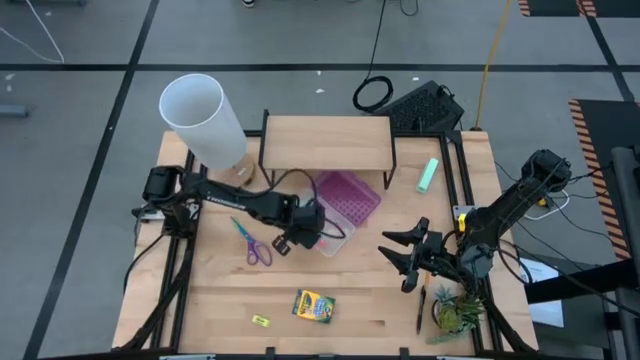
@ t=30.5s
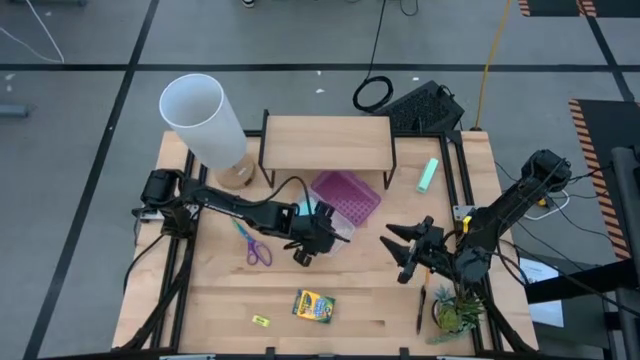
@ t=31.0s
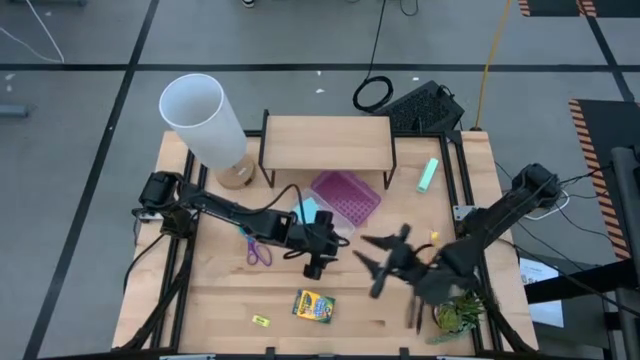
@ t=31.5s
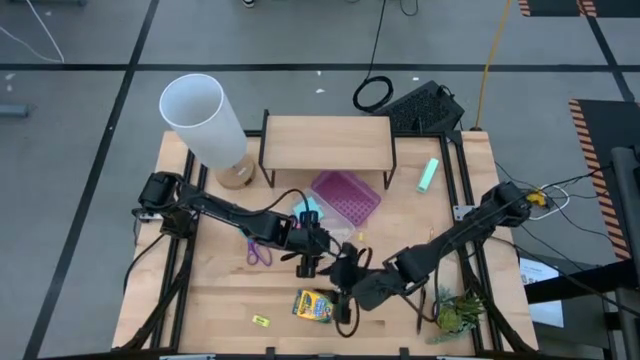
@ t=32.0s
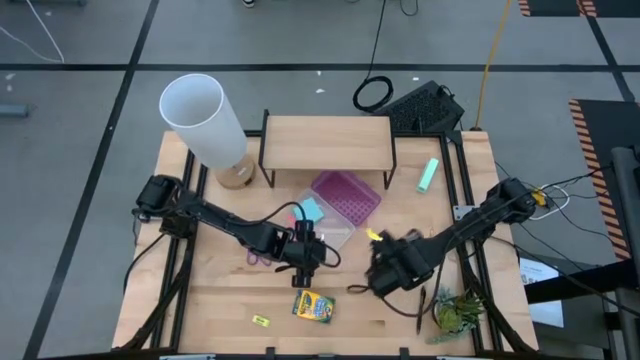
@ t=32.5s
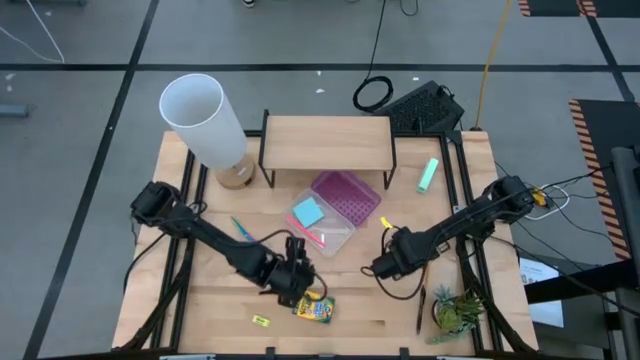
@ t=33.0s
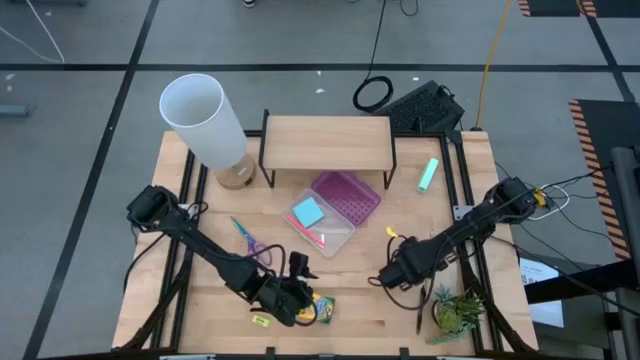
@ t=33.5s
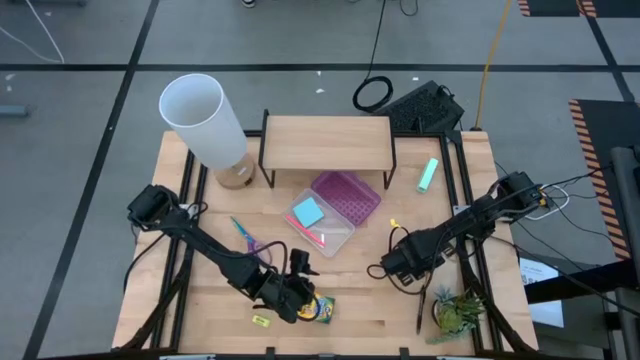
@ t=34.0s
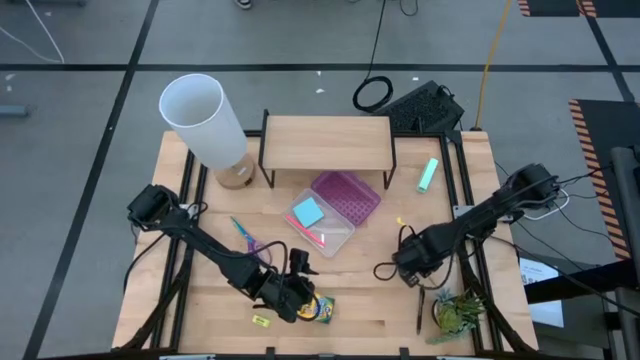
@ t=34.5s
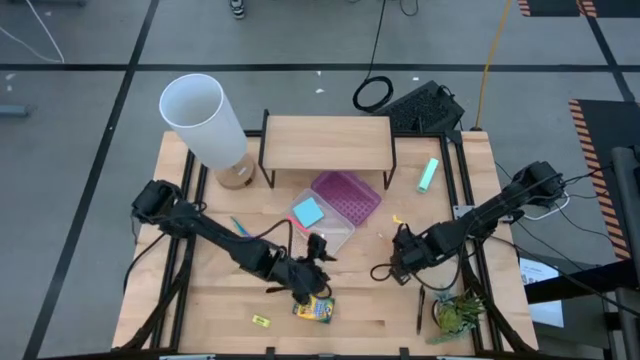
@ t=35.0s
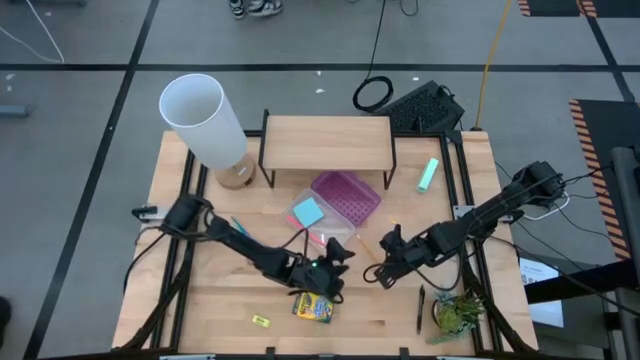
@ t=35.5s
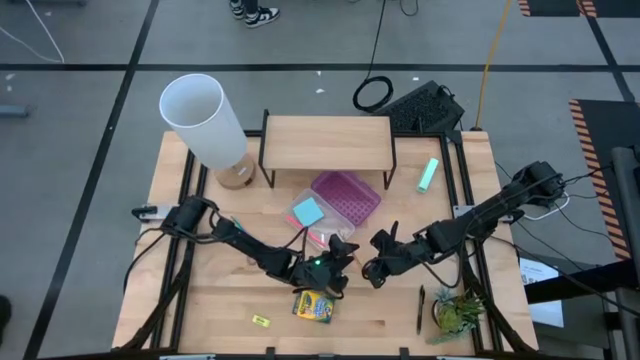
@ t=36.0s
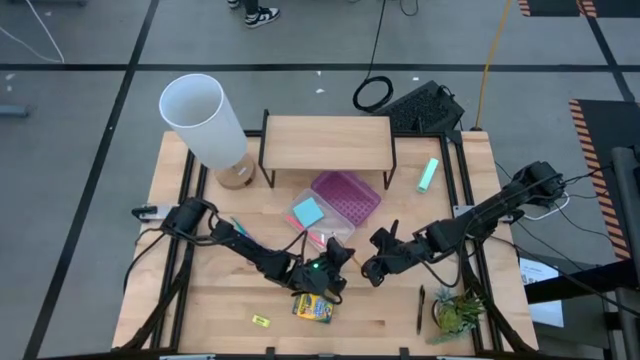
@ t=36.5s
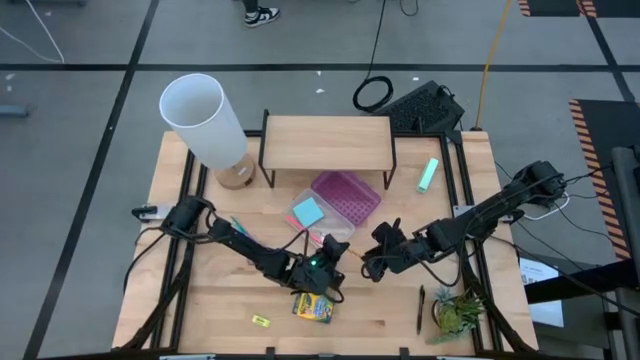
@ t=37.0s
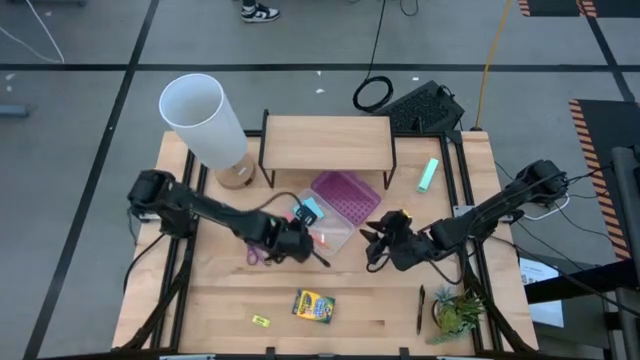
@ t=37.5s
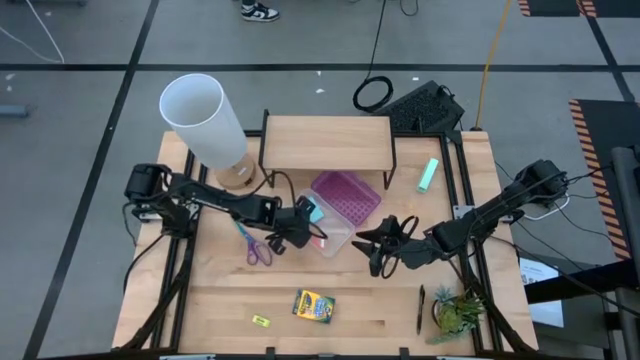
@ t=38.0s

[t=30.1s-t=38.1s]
Task: Pack school essentials
Put the orange pencil into the supply box

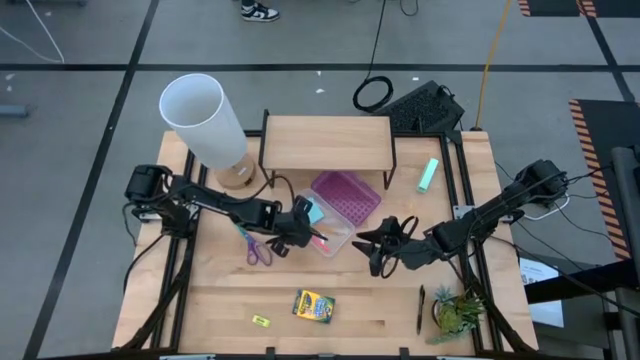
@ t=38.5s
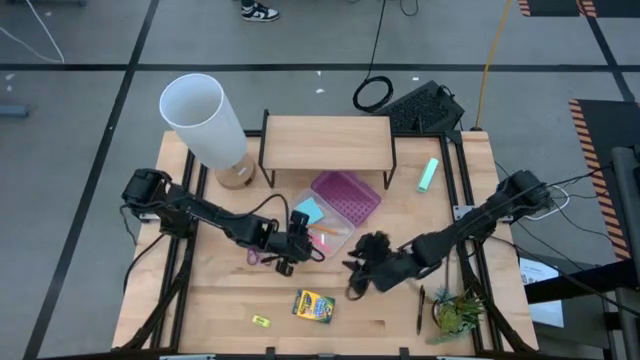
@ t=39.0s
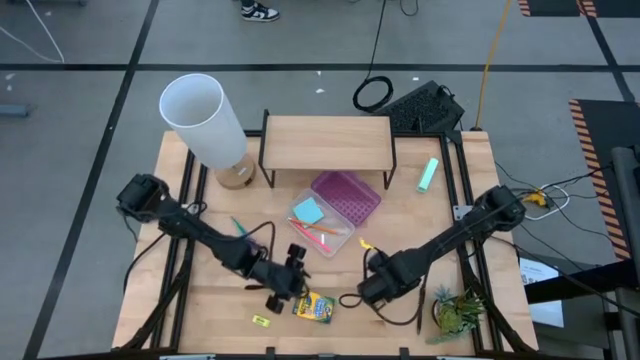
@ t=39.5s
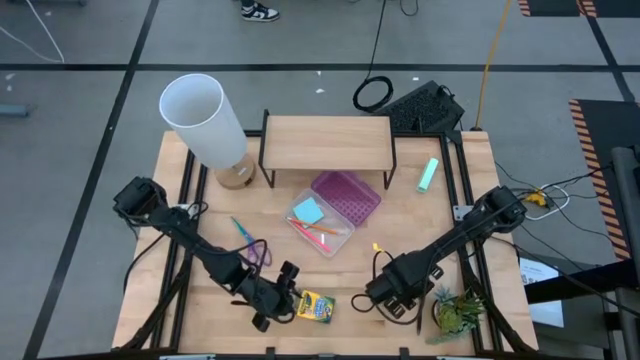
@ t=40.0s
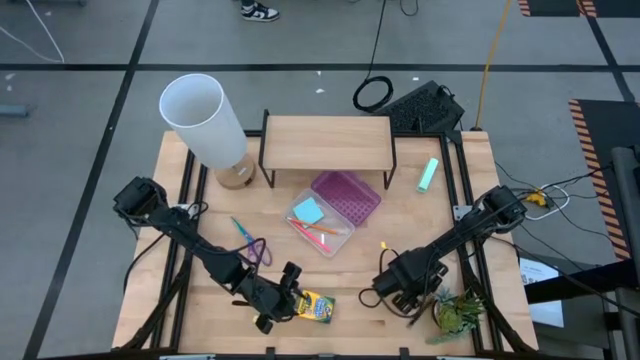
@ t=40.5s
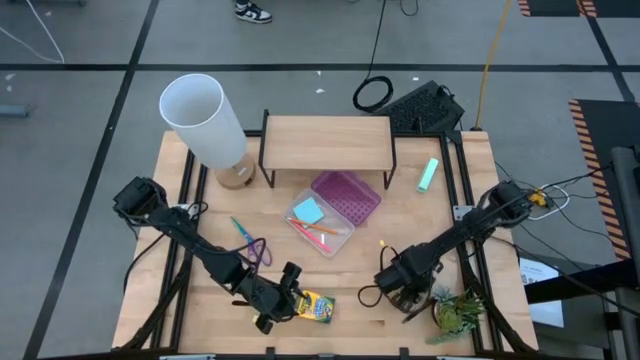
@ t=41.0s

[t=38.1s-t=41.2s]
Put the pen into the supply box

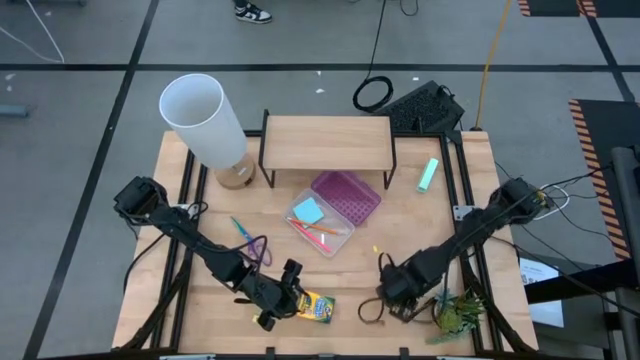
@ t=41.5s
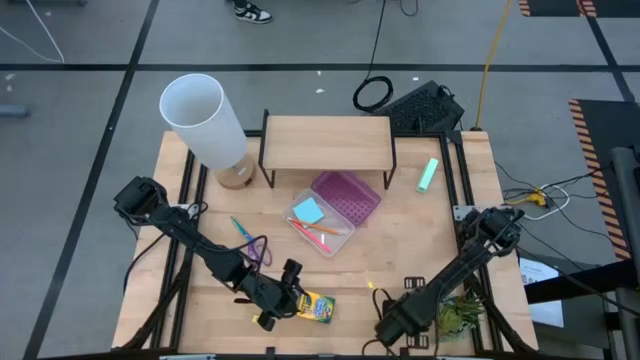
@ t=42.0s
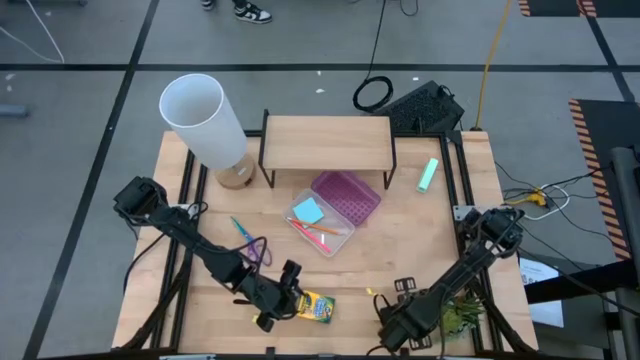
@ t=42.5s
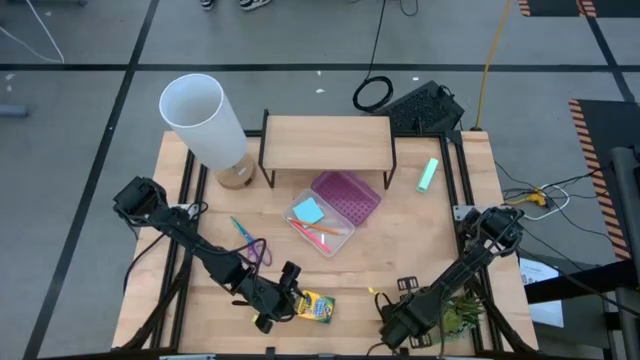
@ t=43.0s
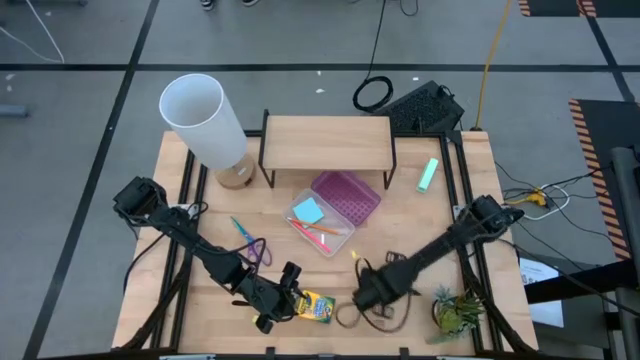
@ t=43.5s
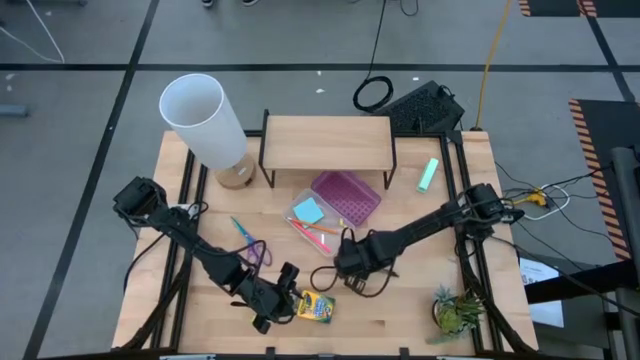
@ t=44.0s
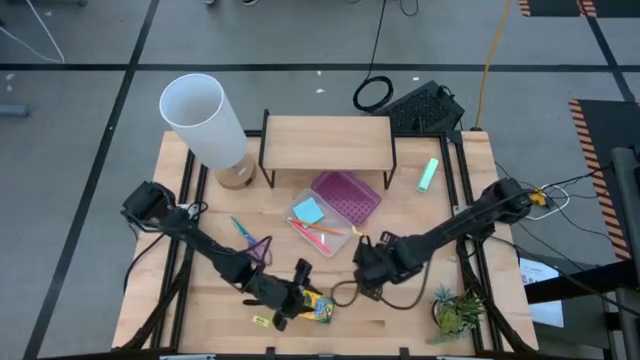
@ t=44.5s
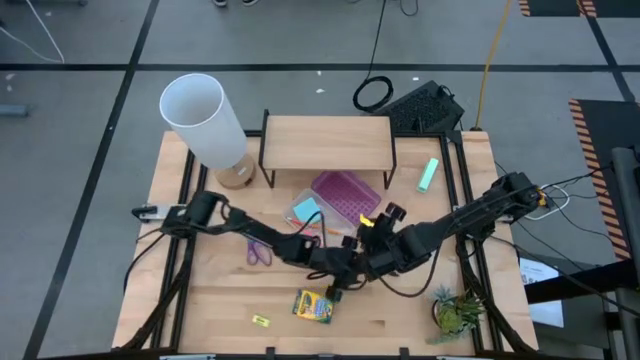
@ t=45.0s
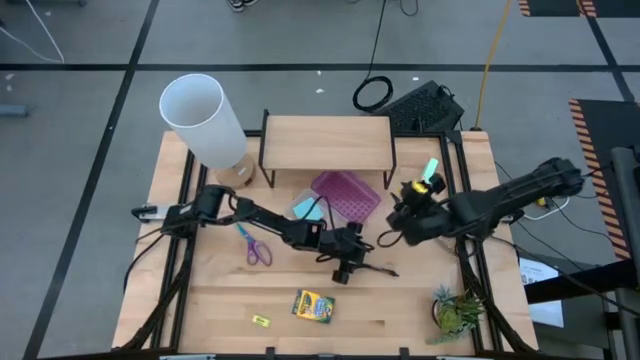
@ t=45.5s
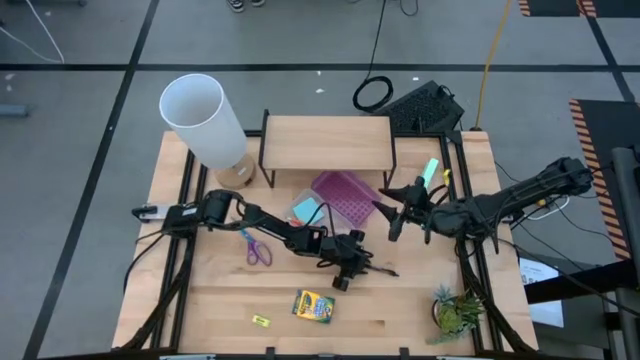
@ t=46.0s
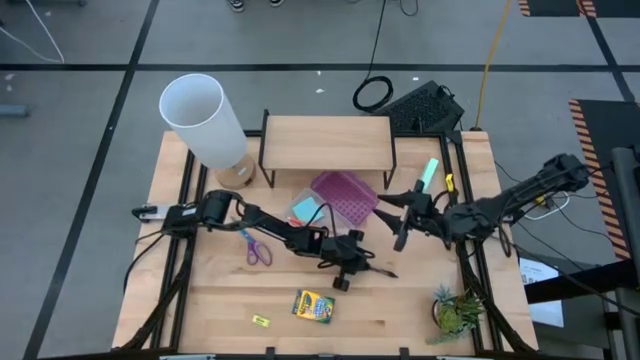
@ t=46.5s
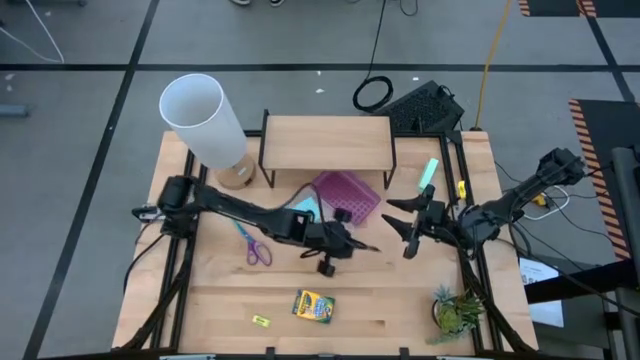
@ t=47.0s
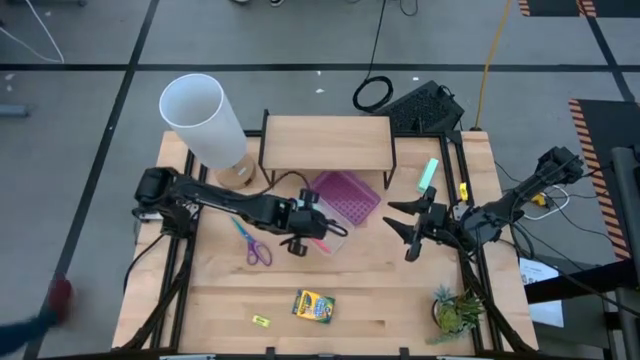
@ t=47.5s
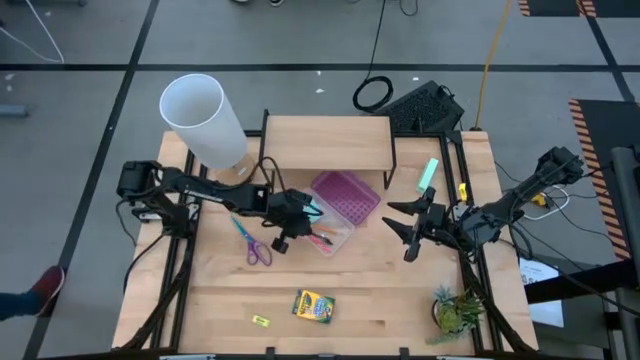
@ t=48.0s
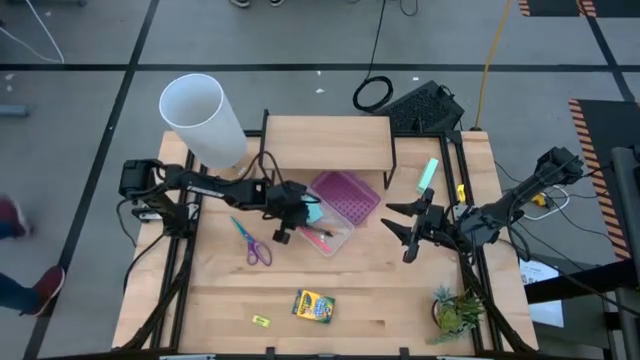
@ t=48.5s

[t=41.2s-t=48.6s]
Put the pen into the supply box

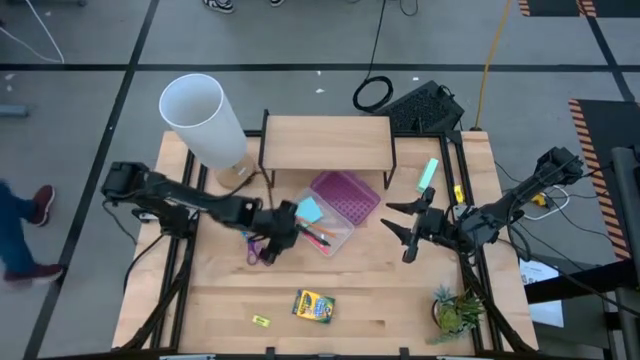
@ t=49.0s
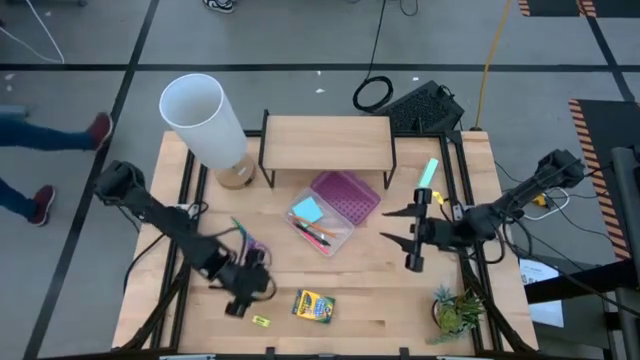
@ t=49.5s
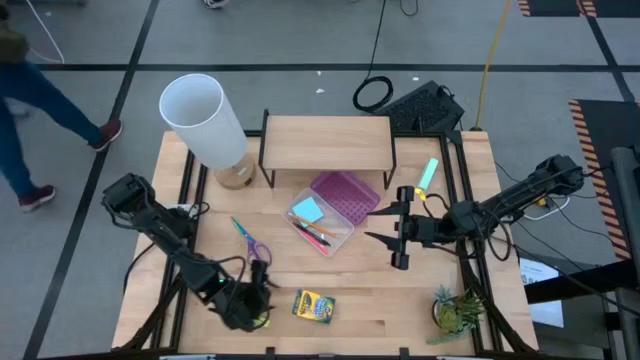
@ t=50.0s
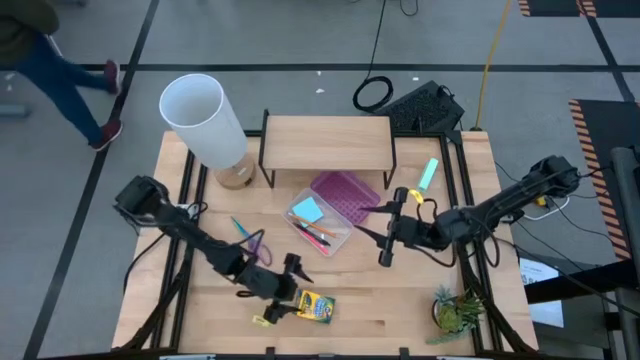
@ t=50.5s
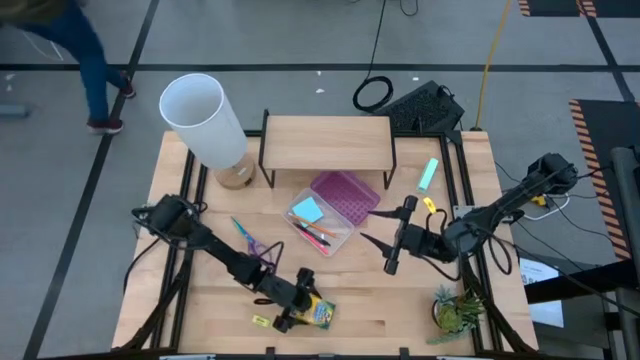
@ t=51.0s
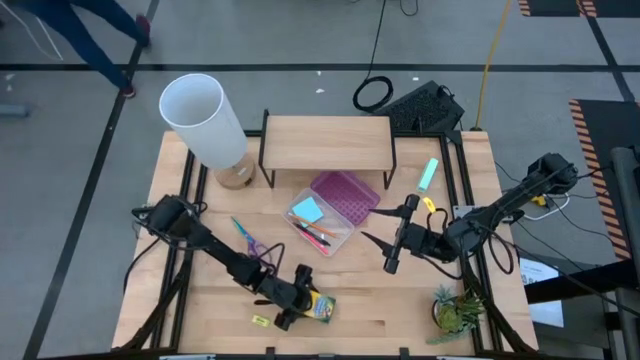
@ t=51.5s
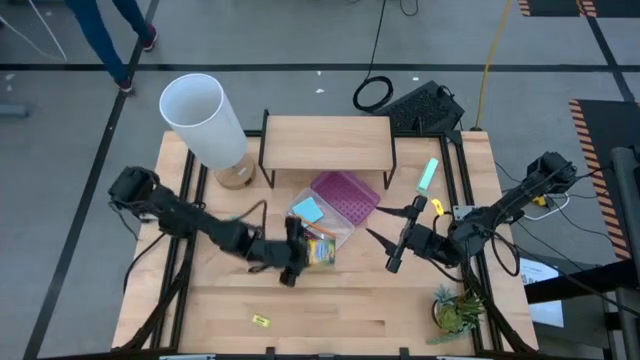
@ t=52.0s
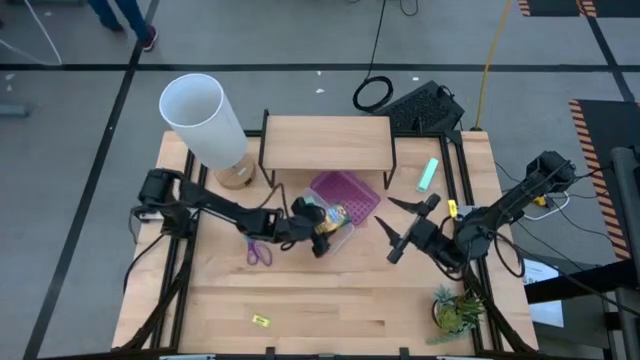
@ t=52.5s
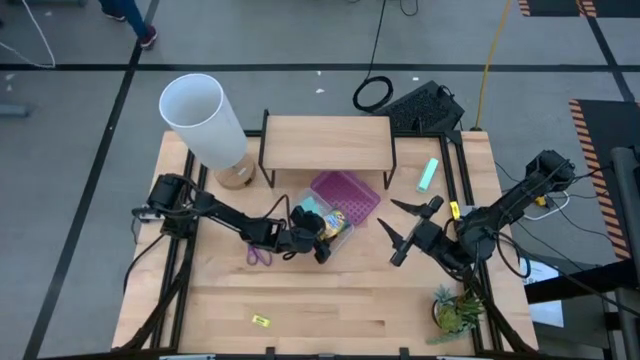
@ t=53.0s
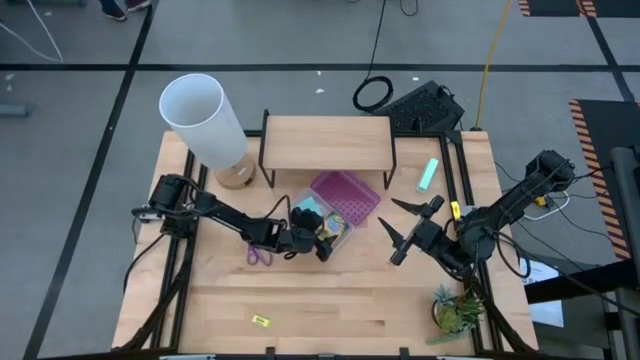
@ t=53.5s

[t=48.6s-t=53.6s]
Put the crayon box into the supply box
